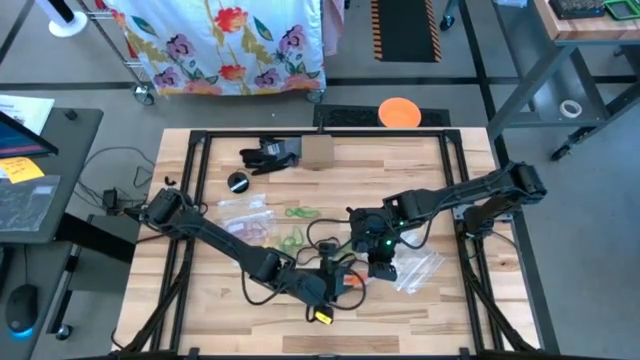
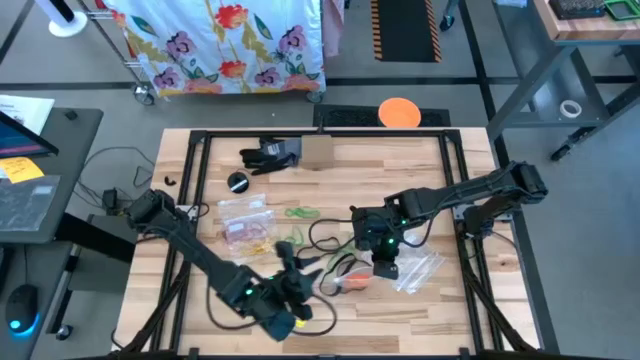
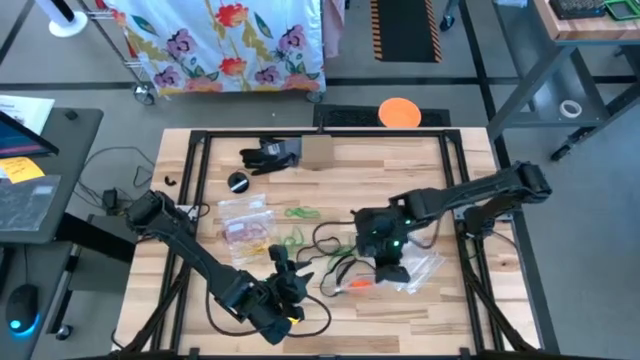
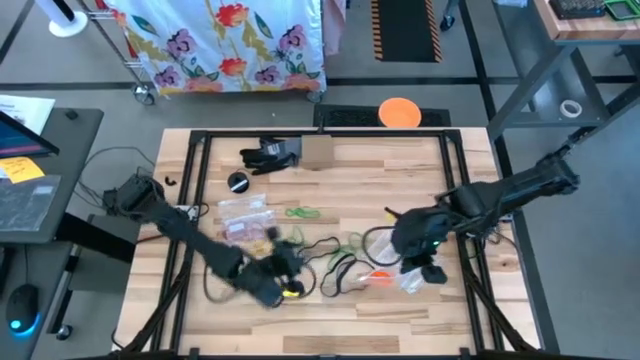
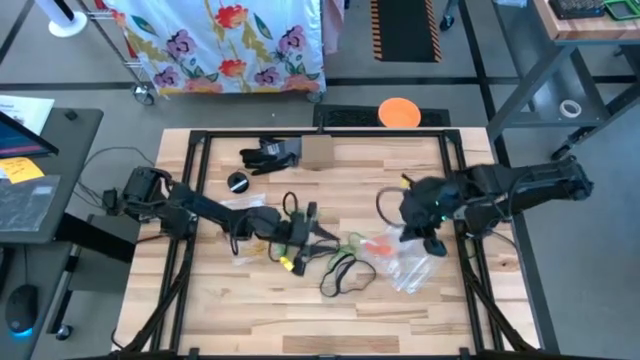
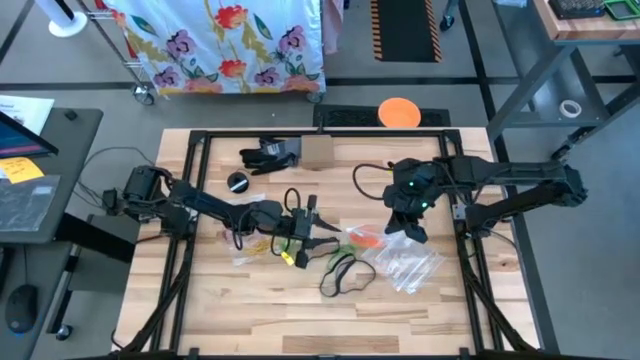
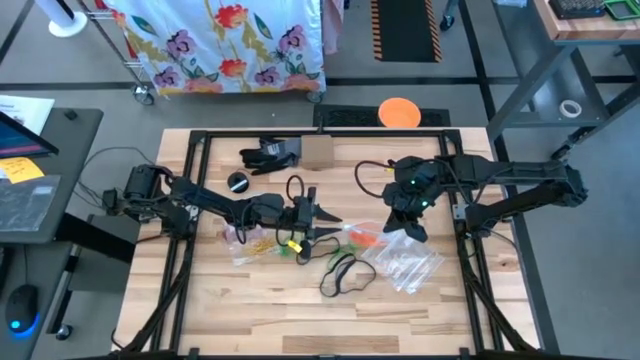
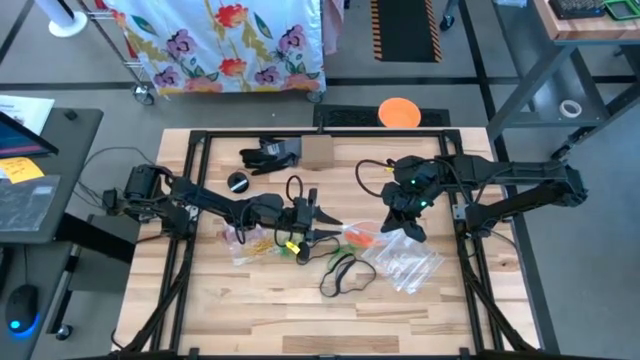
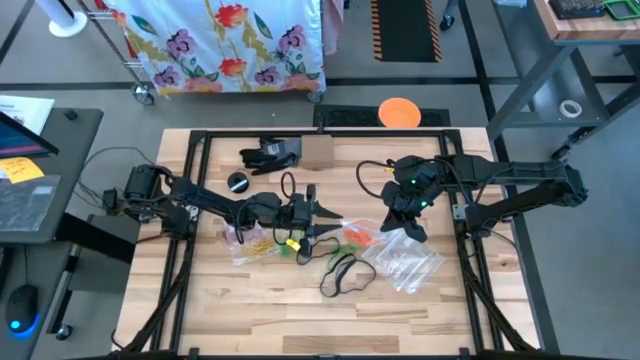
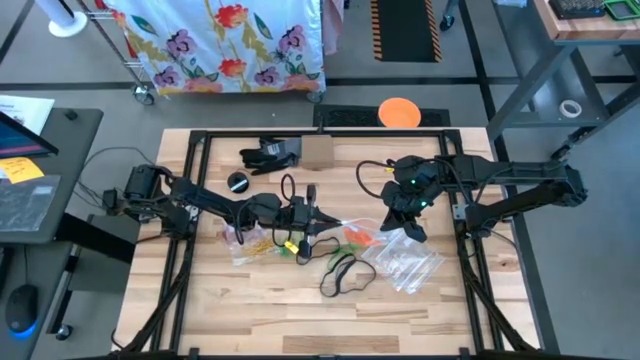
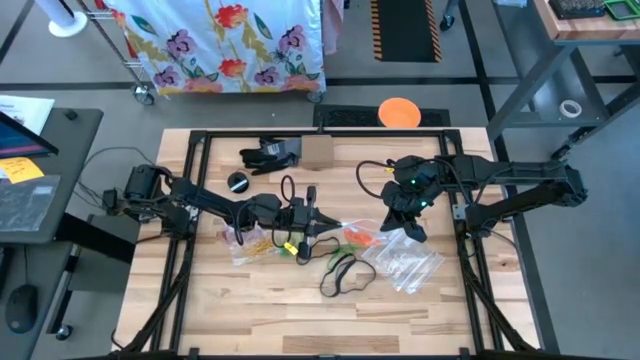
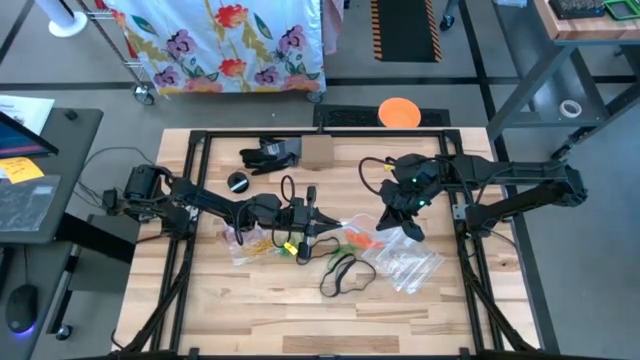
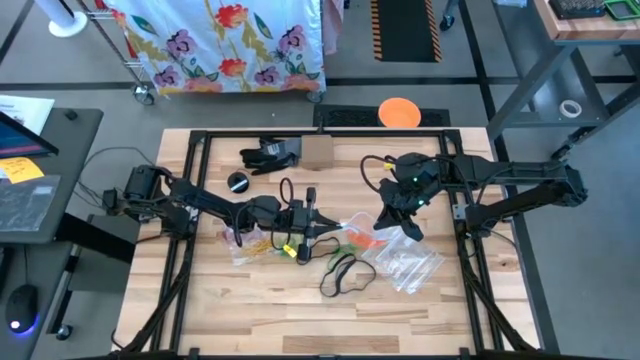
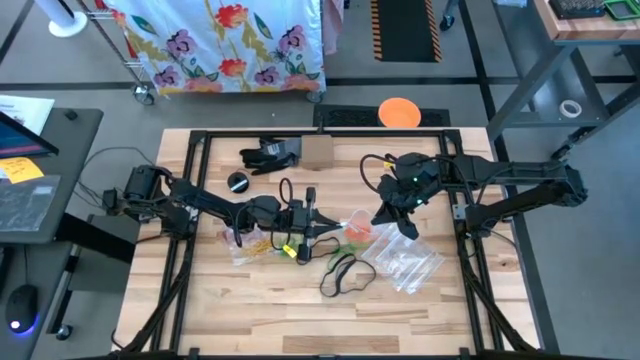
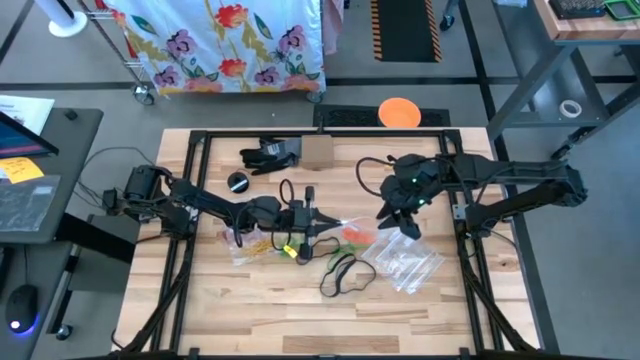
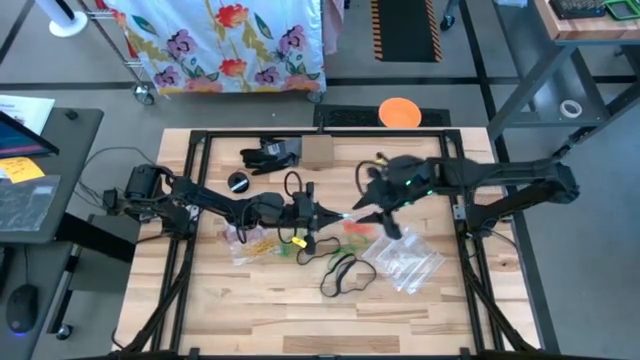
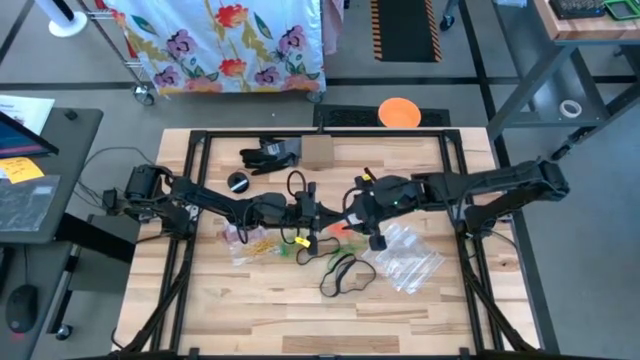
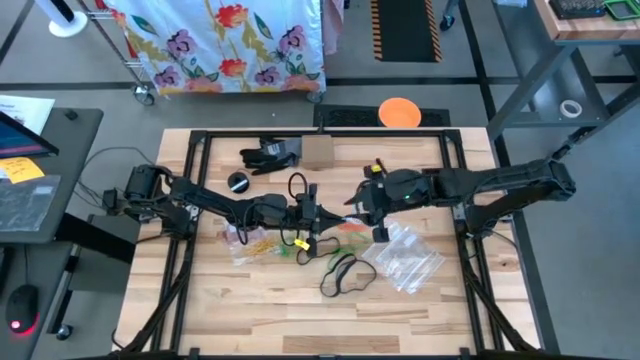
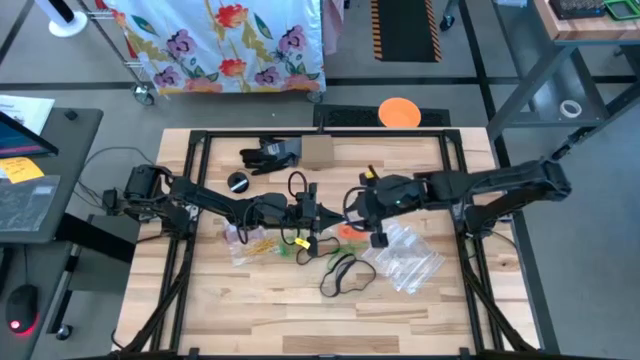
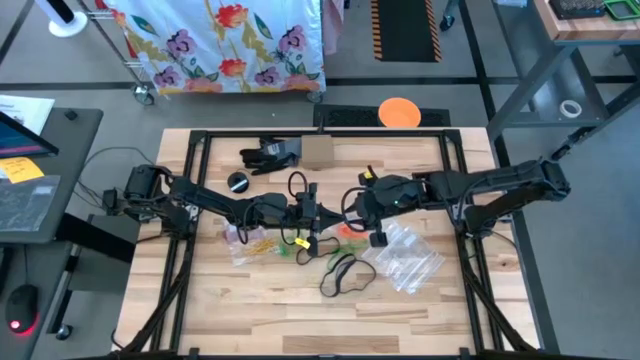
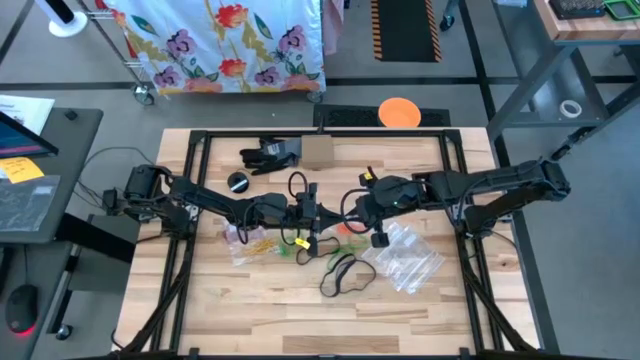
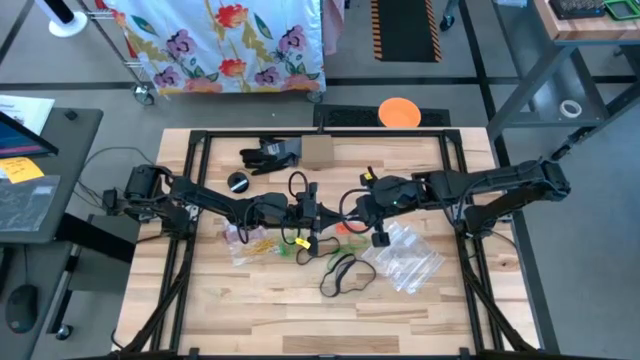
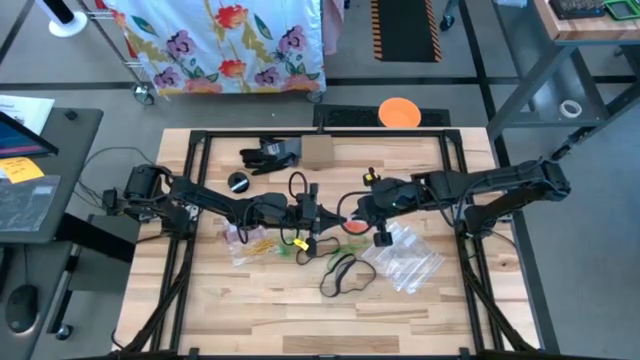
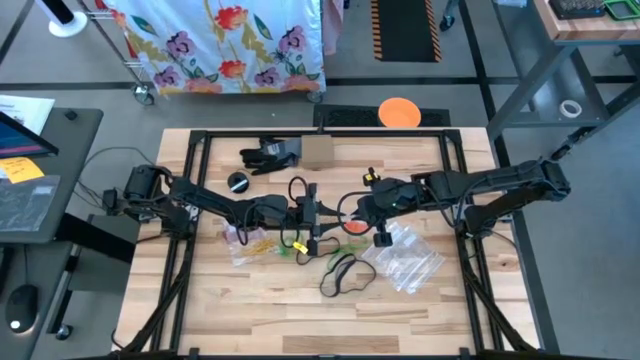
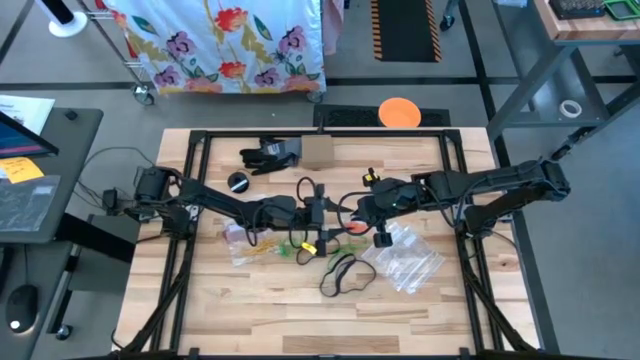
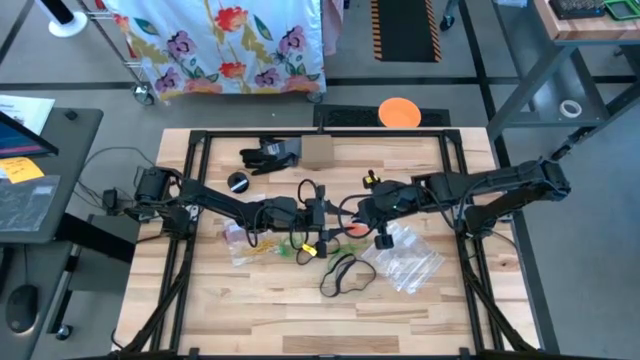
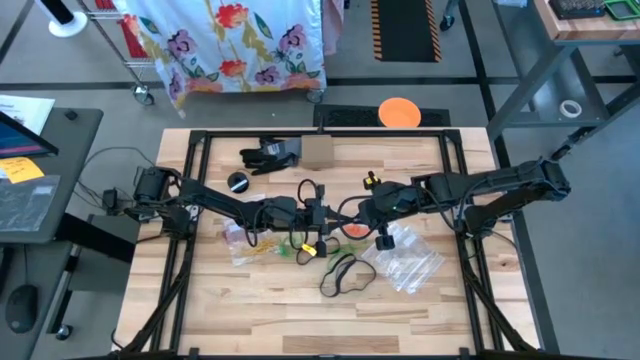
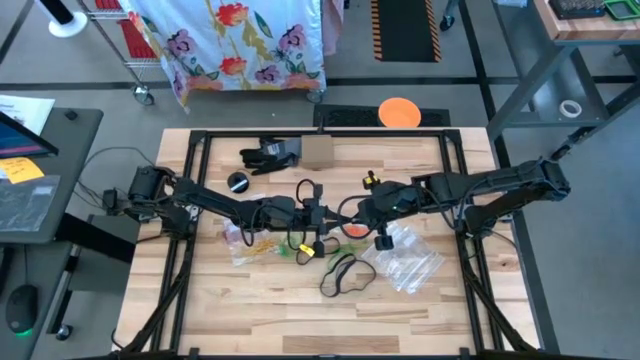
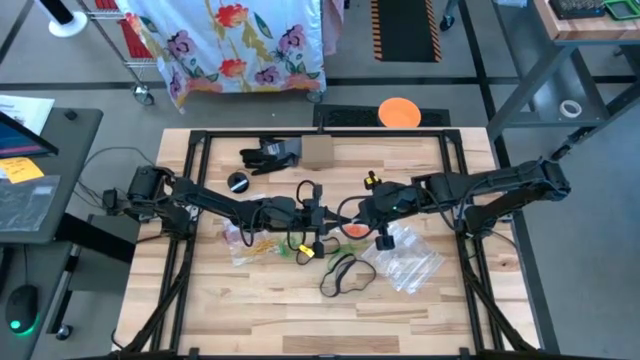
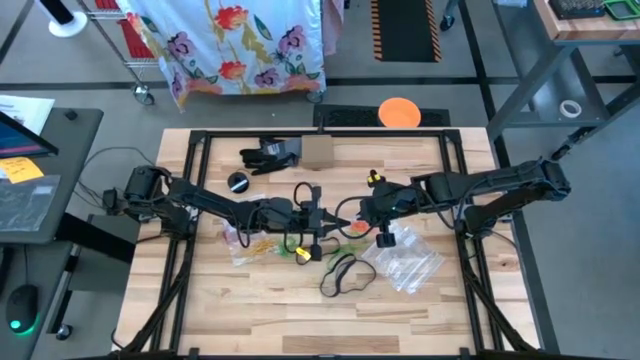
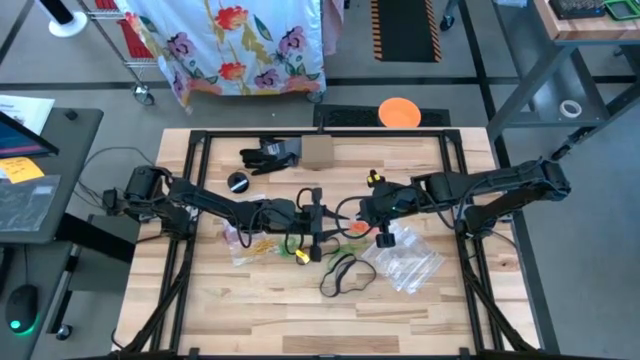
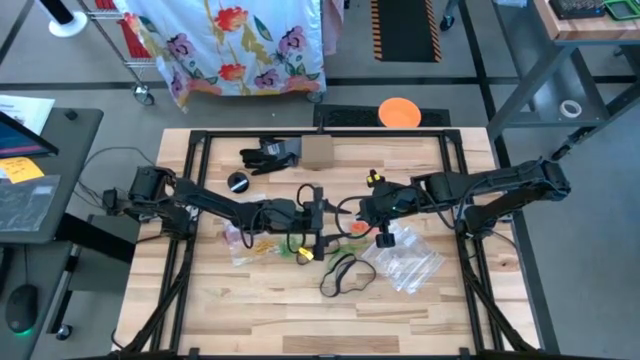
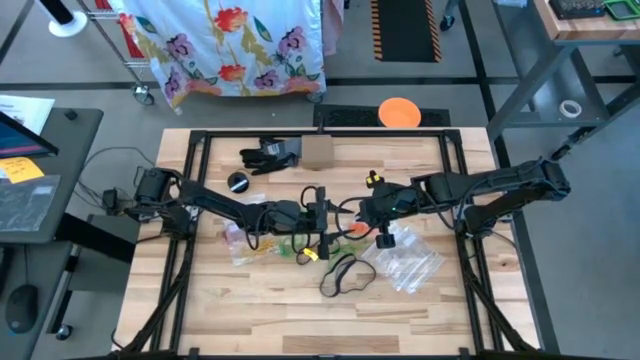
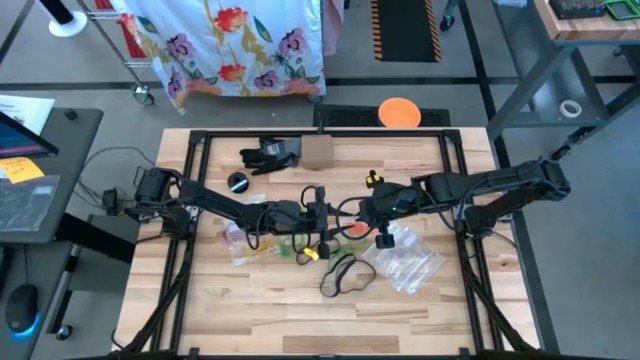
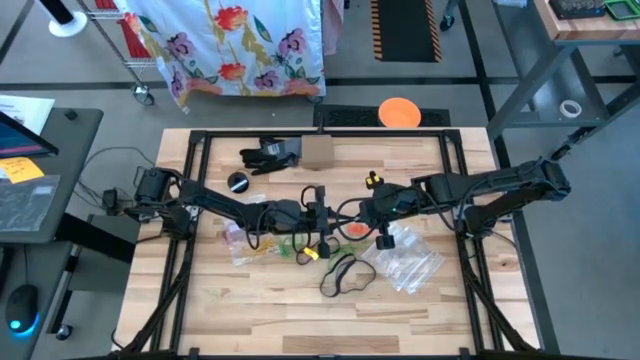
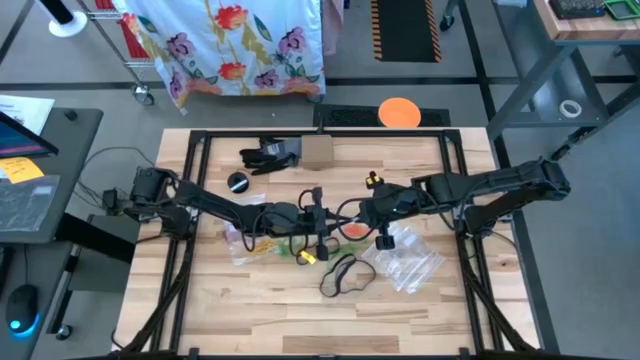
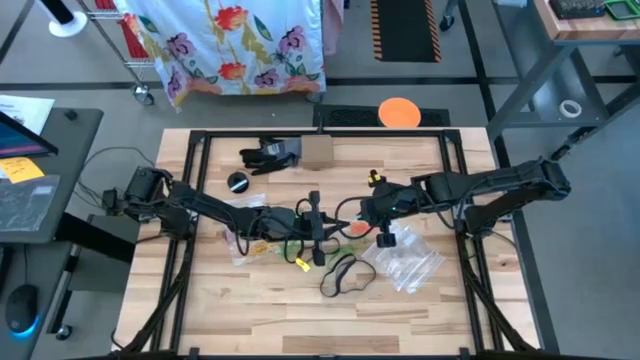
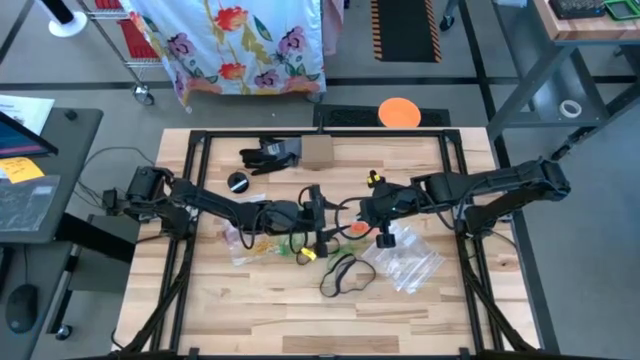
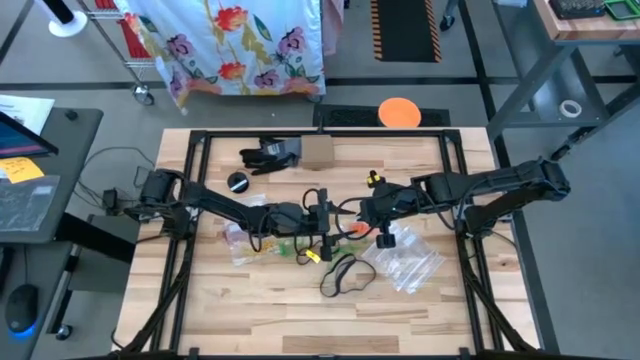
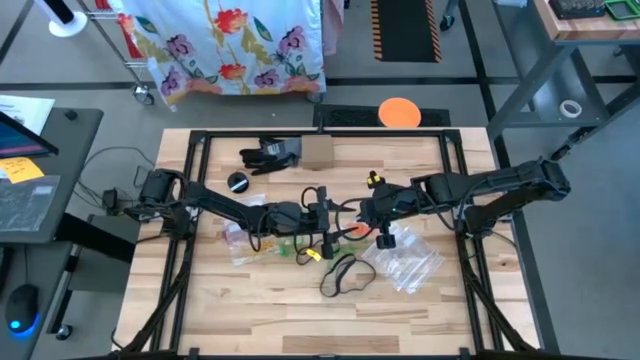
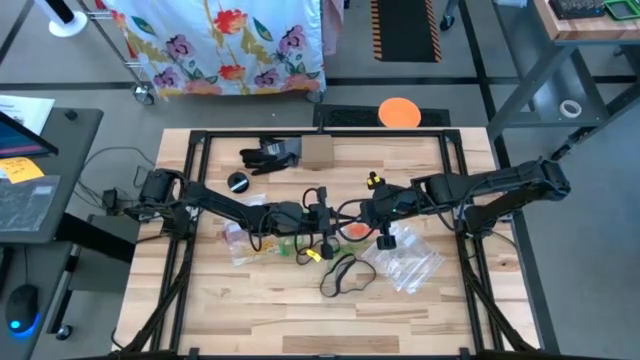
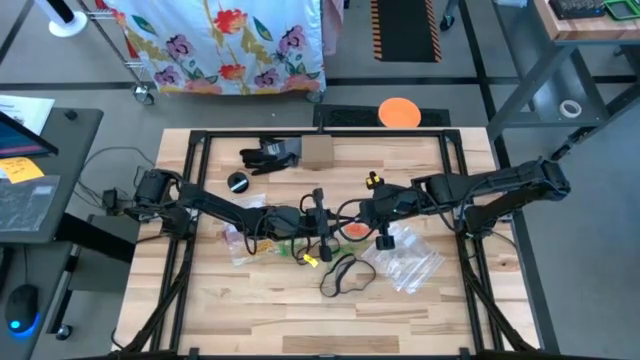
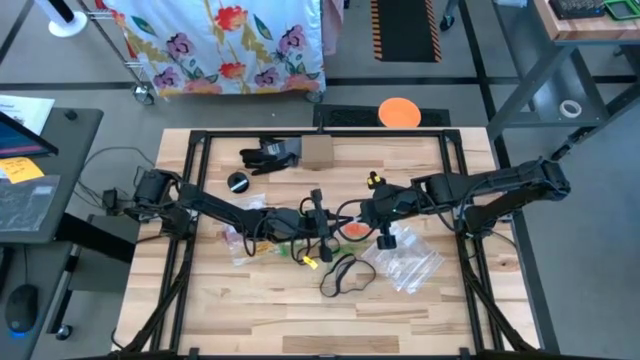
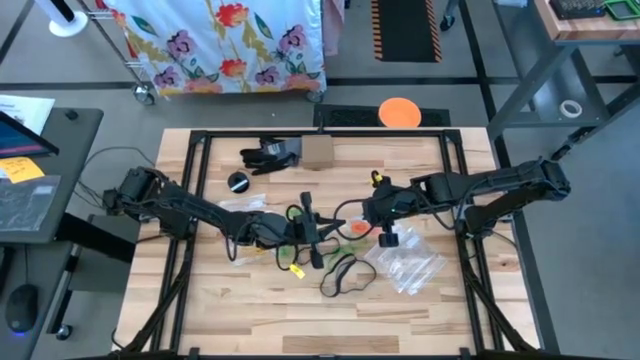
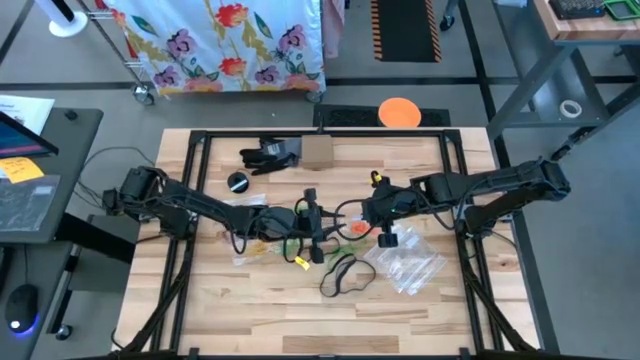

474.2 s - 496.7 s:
Task: Sort rubber bands
Close the transparent zip bag

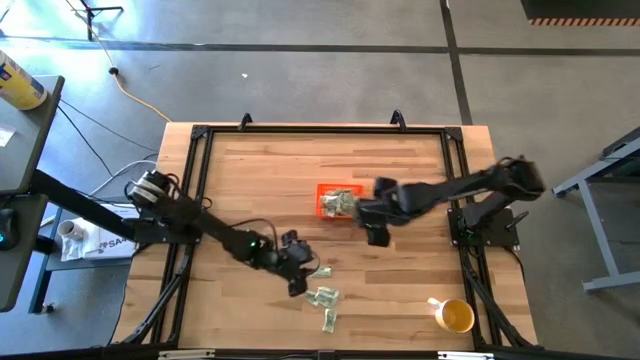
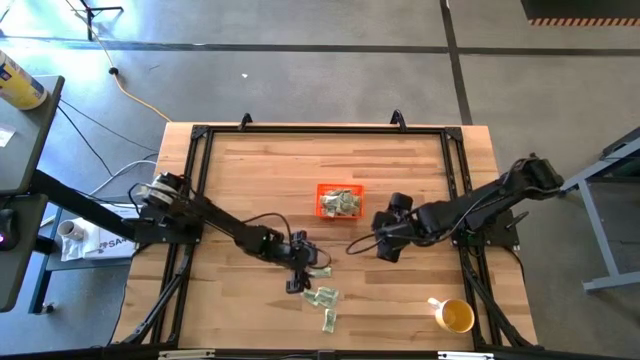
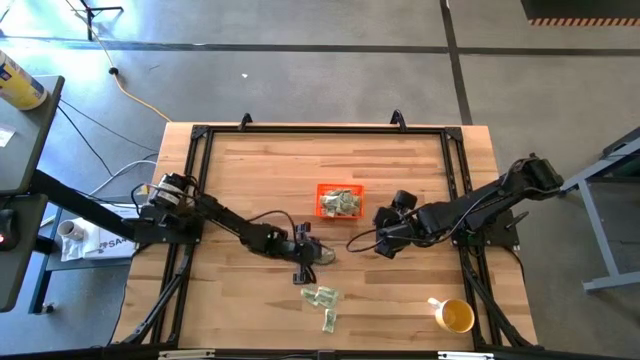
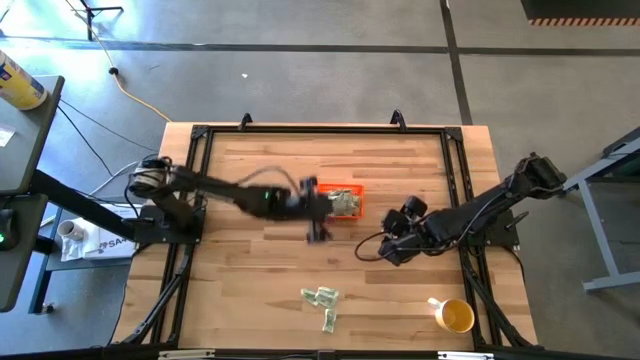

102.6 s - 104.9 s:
Task: Pick and place Stevia / Truvia into bins
Put the stevia packet into the orange bin
